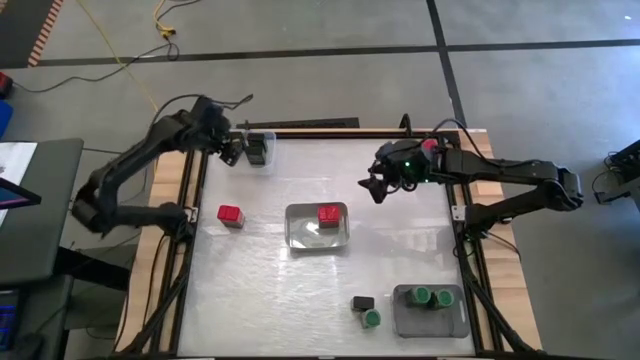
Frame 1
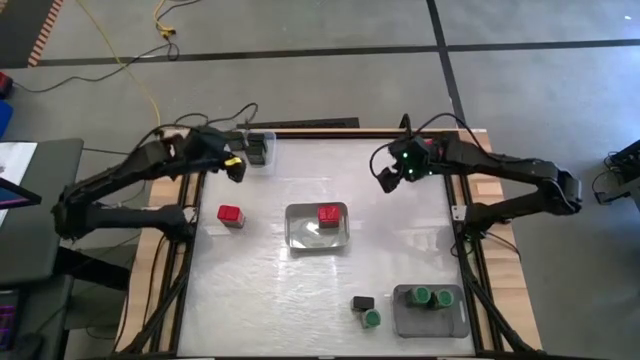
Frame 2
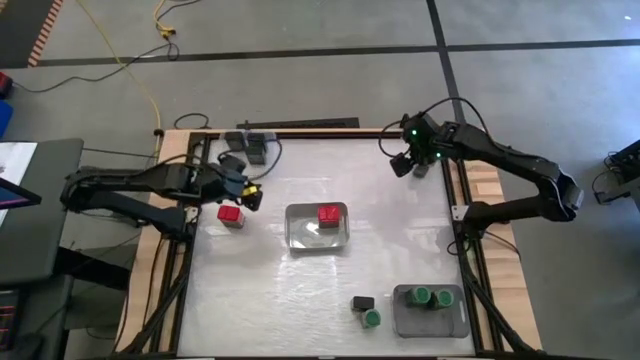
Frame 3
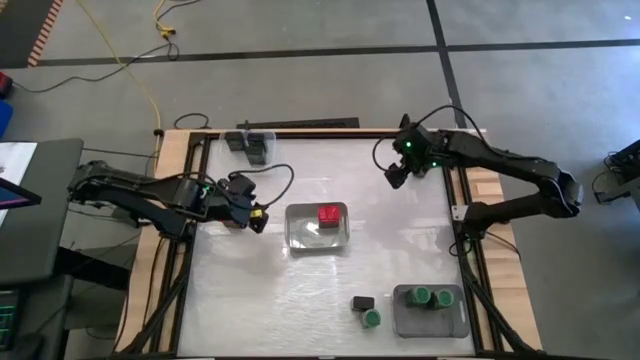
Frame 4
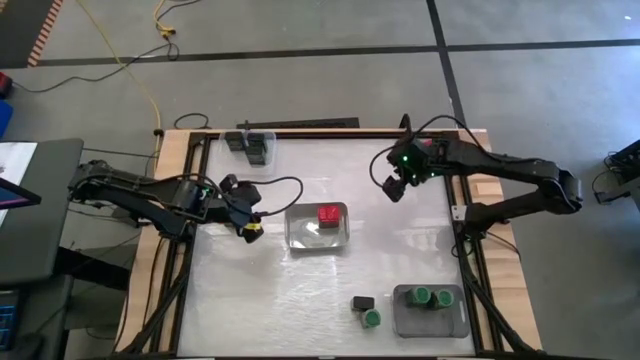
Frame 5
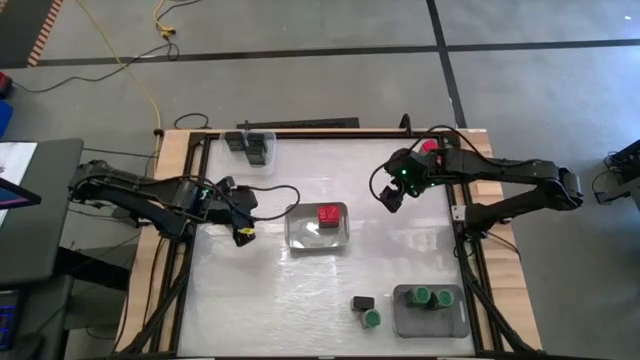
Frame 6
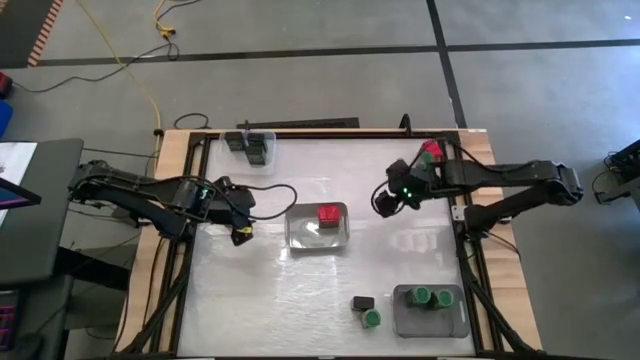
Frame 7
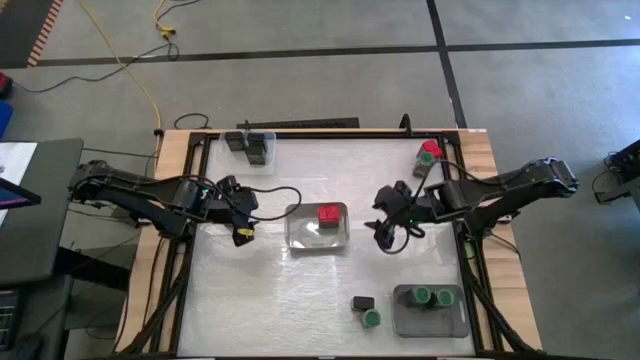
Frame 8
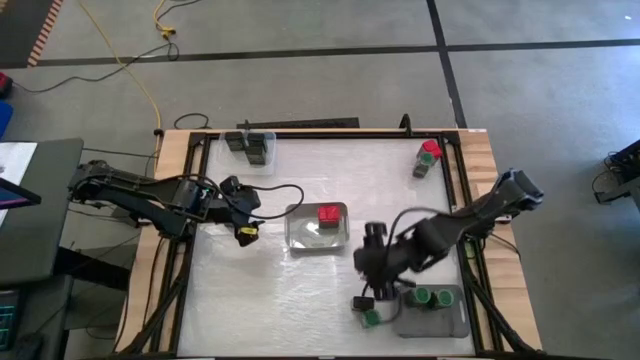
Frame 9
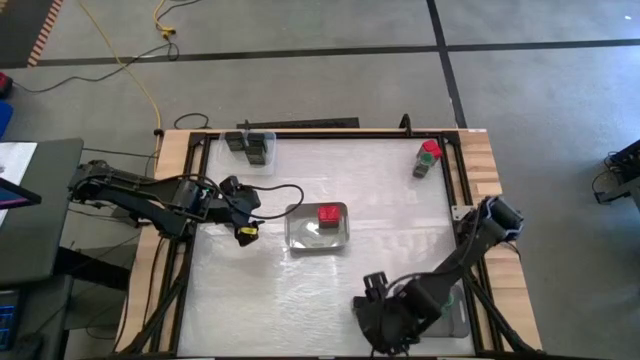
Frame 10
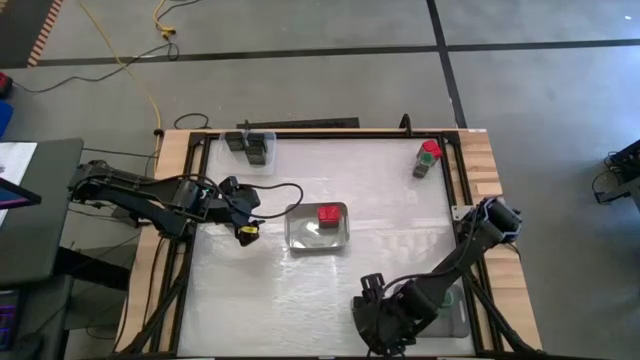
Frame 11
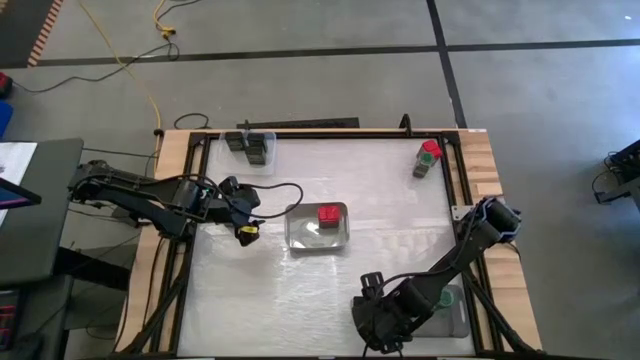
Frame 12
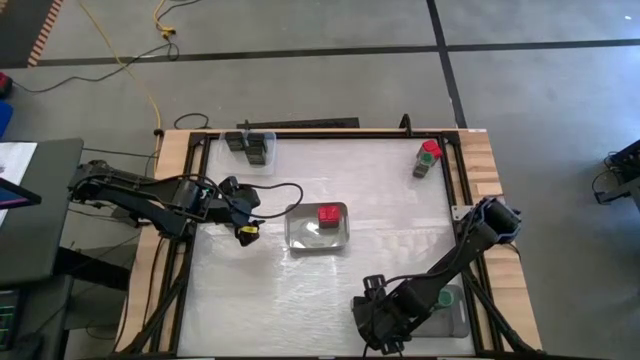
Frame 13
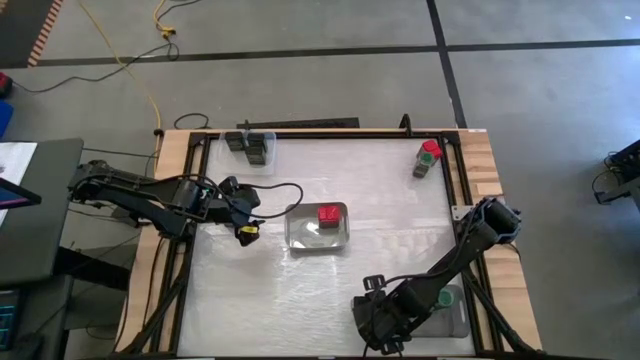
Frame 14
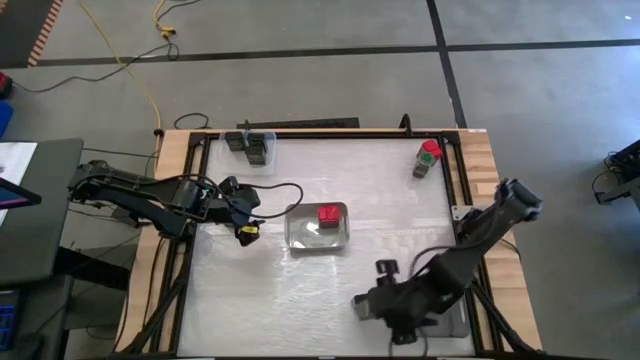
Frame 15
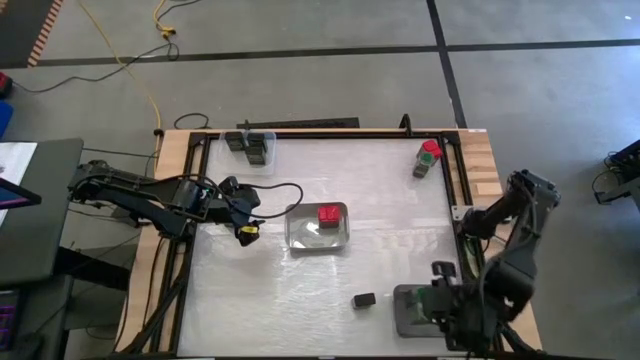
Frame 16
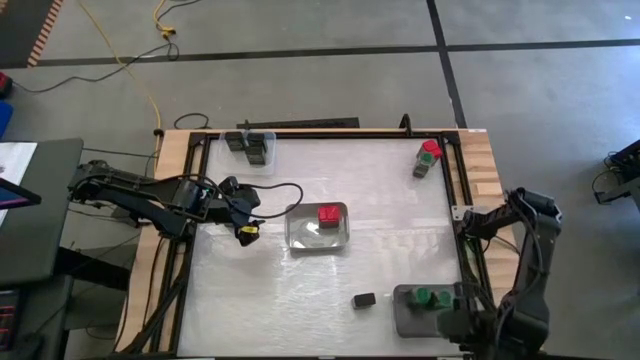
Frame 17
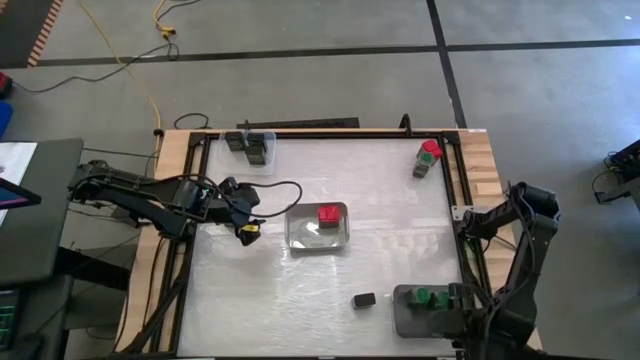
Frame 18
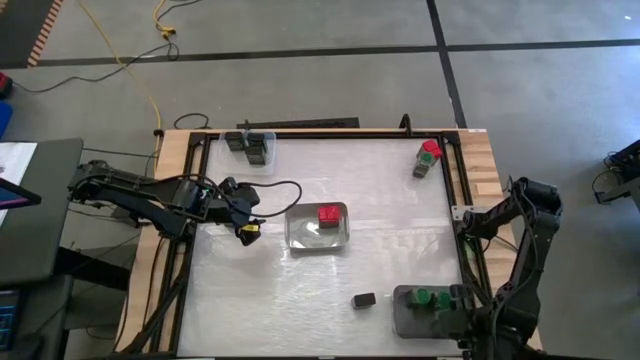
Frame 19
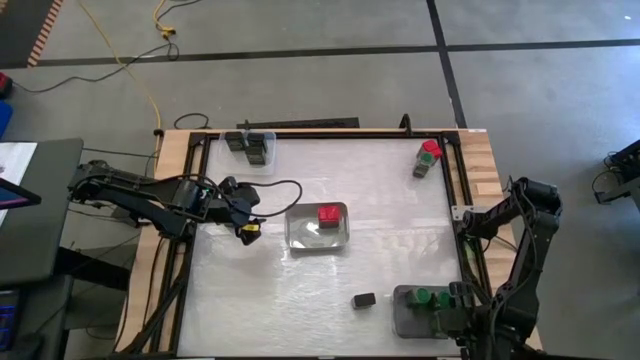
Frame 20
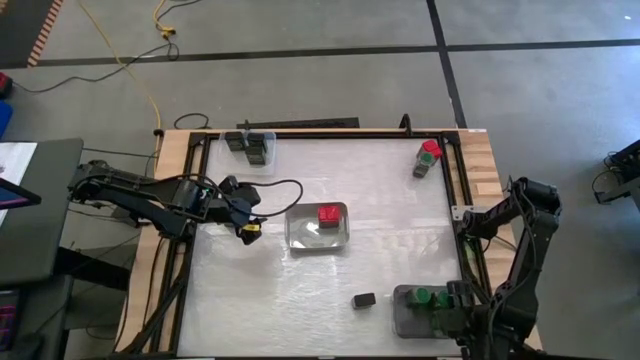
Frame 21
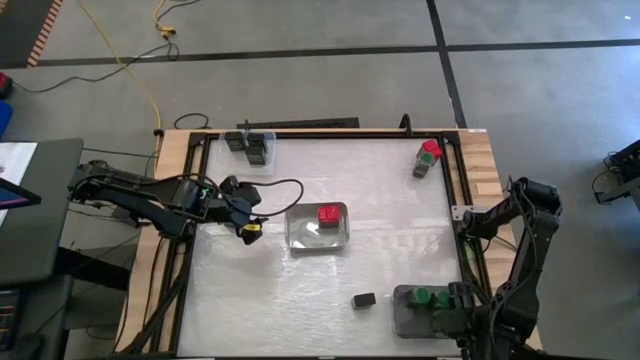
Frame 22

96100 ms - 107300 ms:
Task: Sort spices by type
Put the bottom green seasoning bottle into the black bin

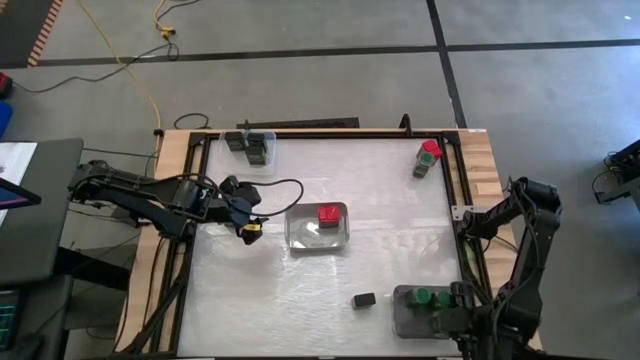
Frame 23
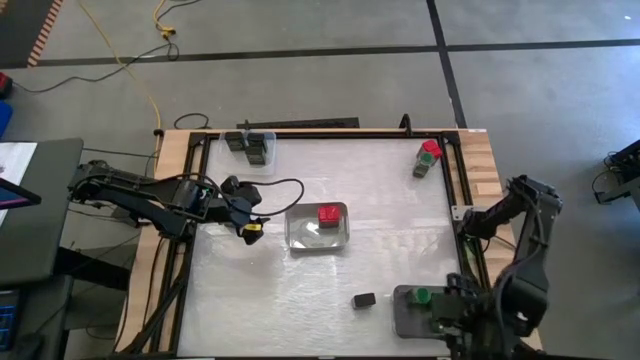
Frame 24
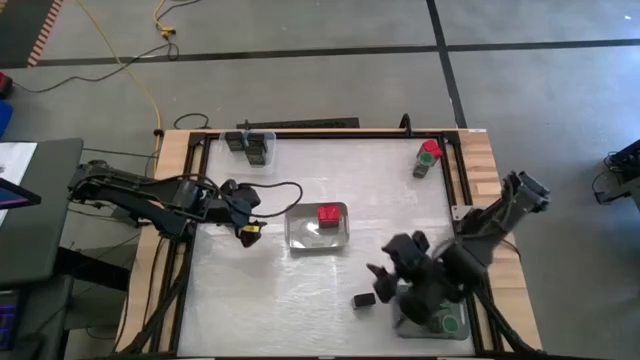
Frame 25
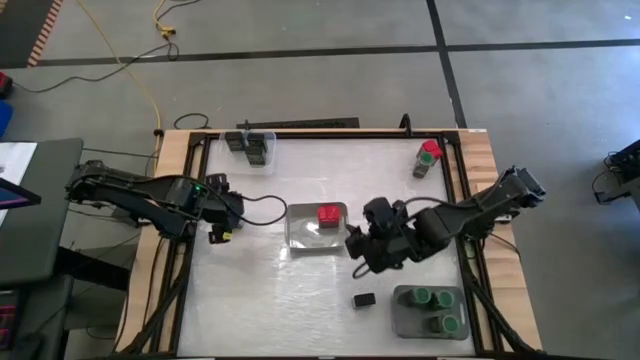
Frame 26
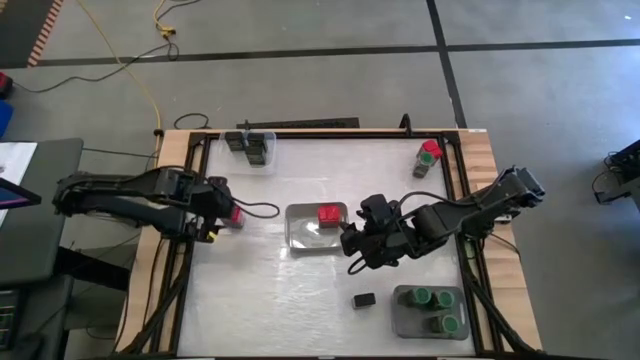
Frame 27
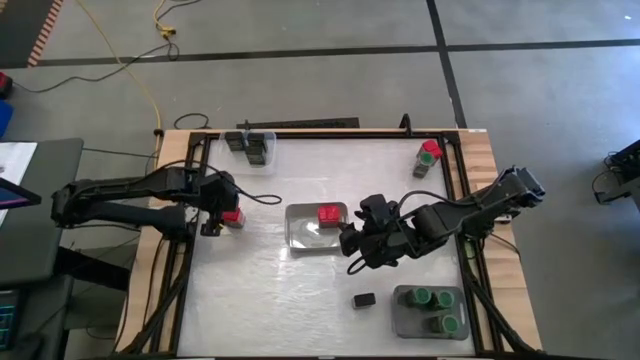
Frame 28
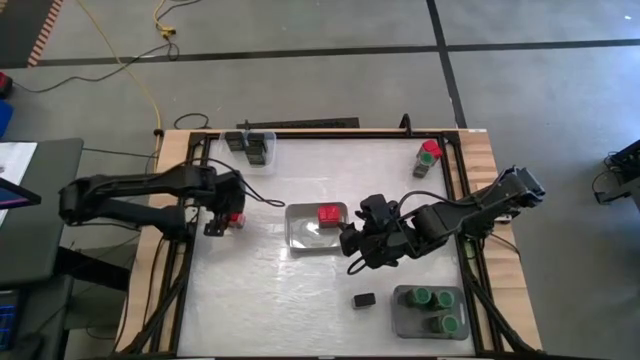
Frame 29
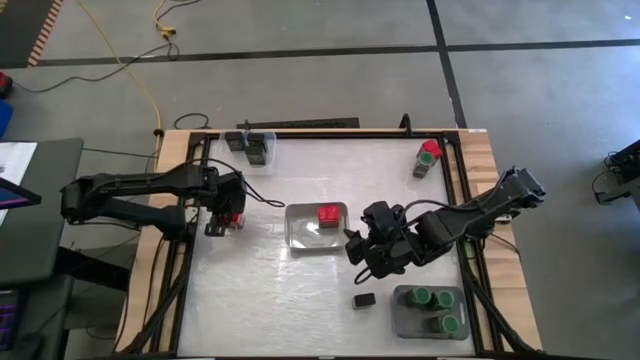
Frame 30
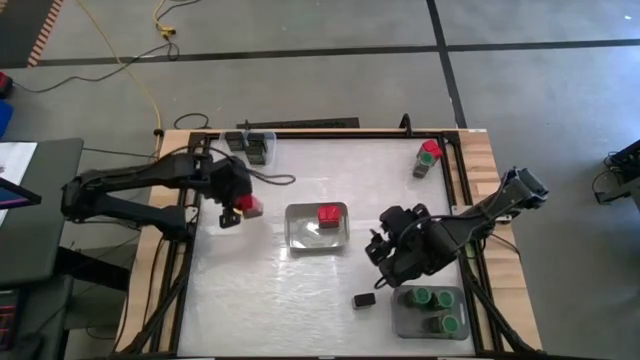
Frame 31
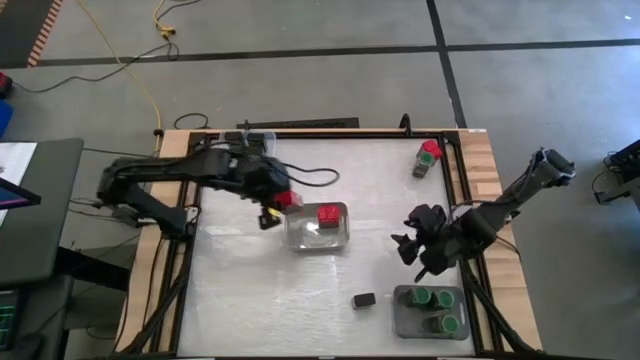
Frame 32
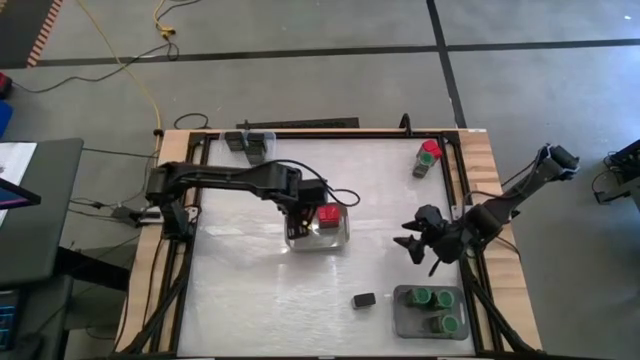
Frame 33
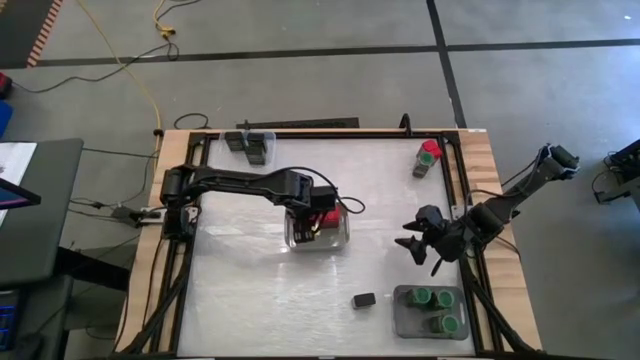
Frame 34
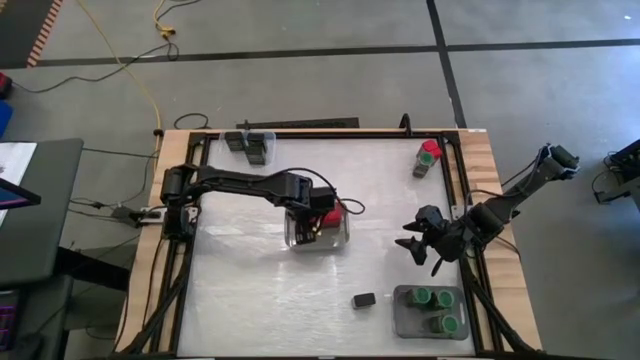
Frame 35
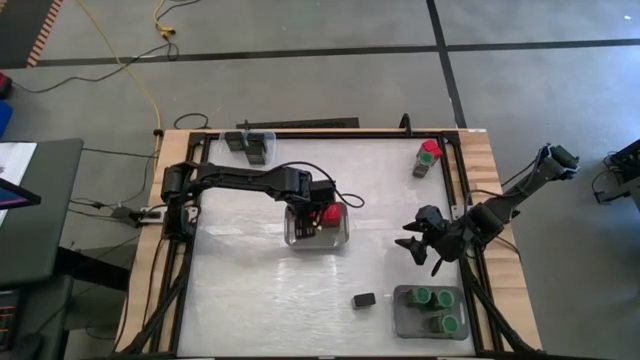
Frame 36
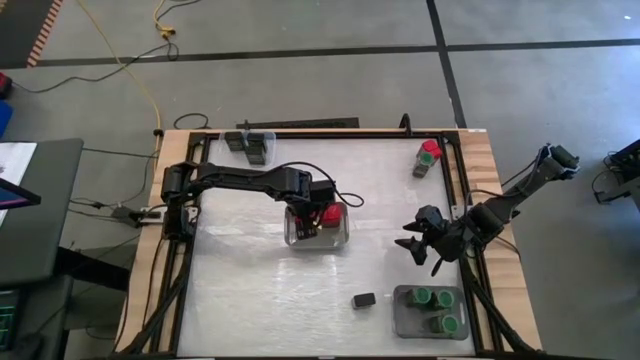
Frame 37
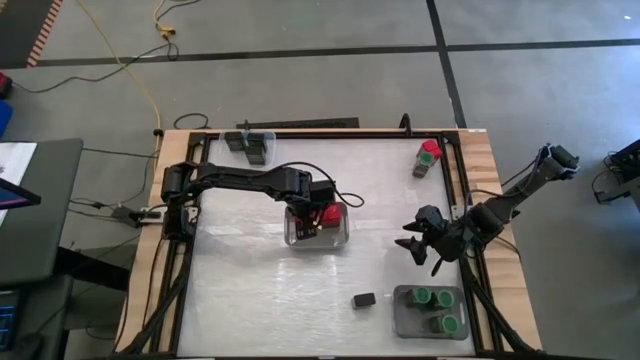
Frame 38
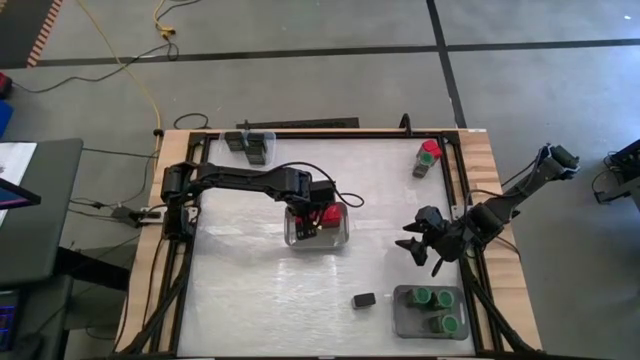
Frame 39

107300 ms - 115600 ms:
Put the bottom red seasoning can into the gray bin

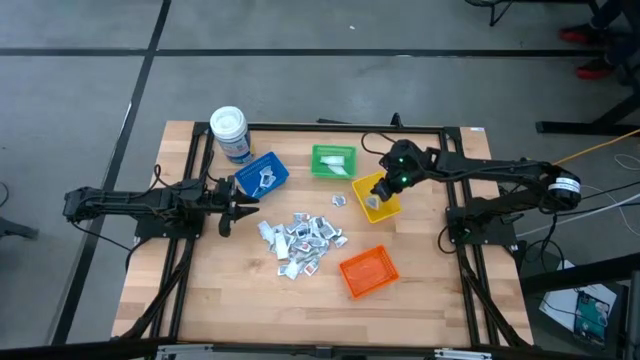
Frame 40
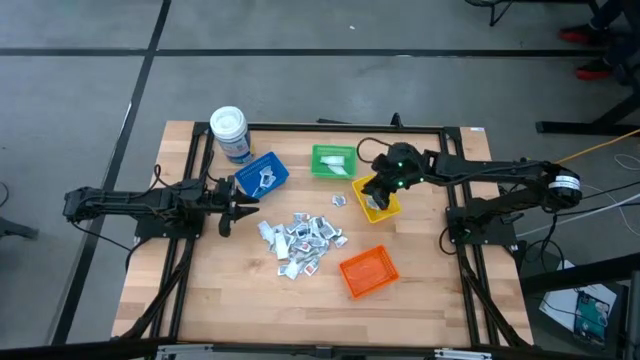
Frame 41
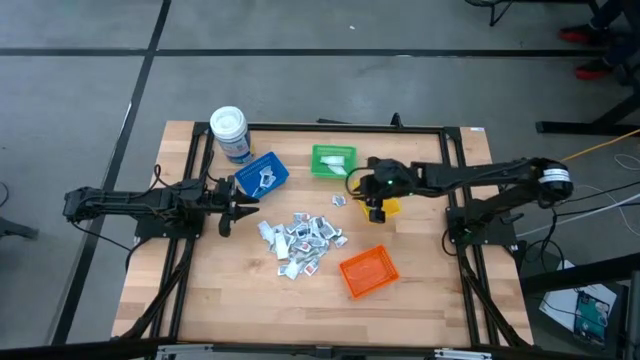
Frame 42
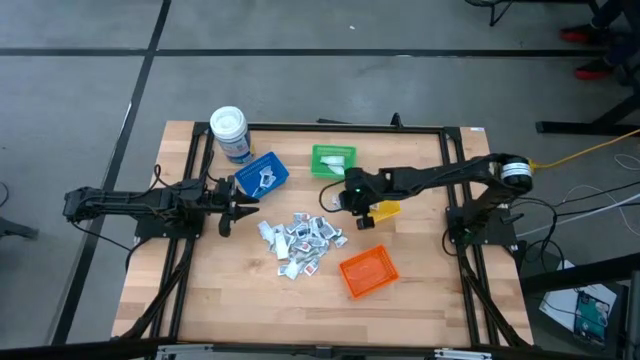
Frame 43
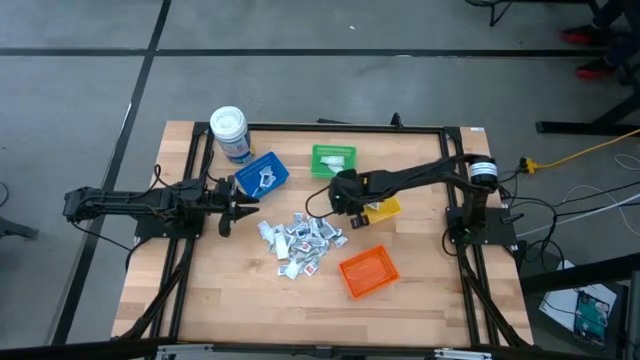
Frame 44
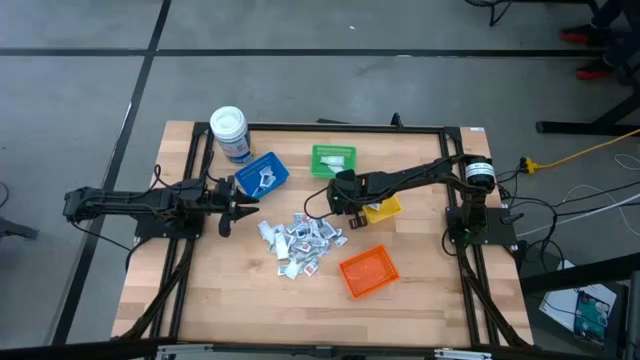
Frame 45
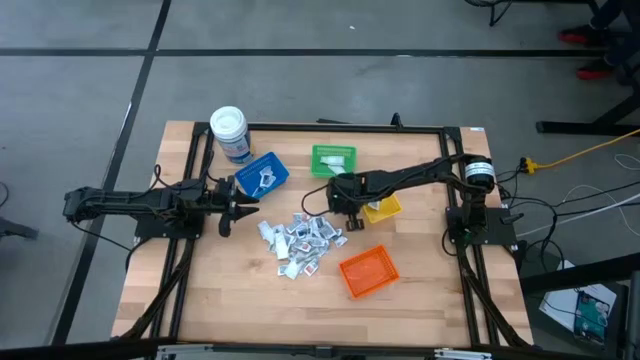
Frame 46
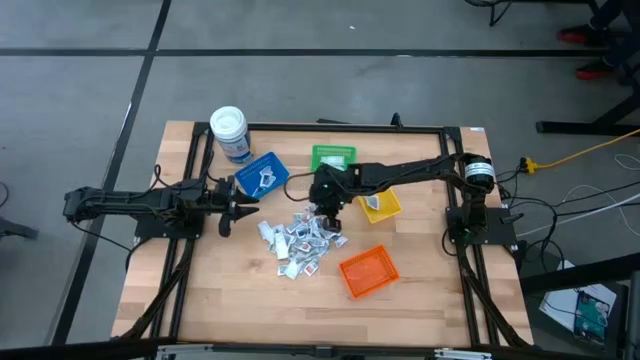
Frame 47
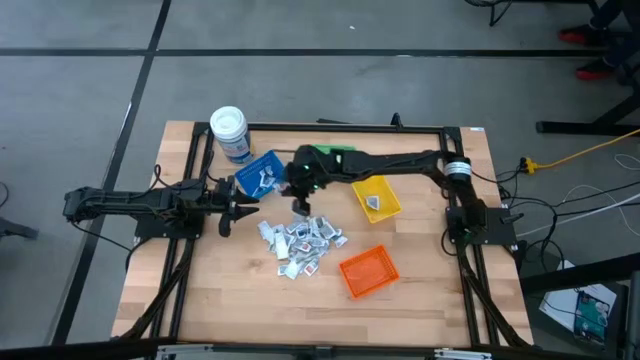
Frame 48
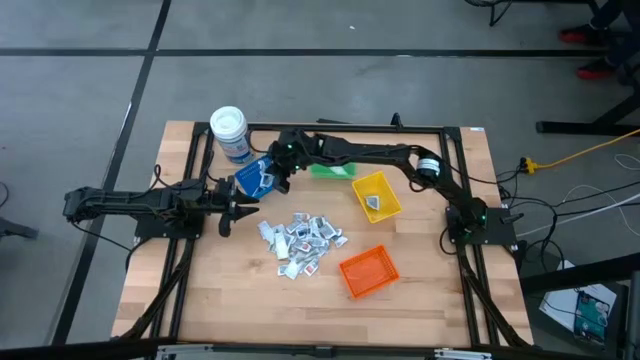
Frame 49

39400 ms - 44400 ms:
Task: Pick & Place First Aid Supplies
Put the white alcohol pad into the blue bin
